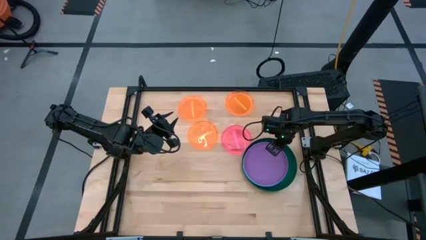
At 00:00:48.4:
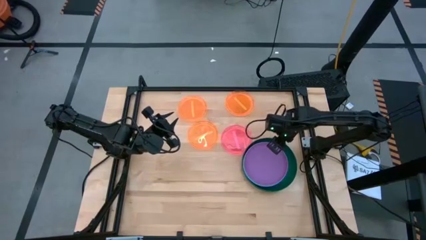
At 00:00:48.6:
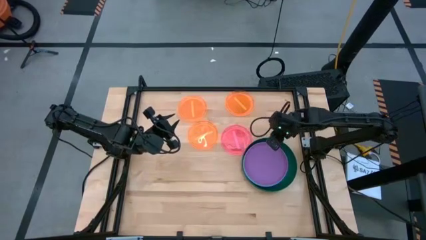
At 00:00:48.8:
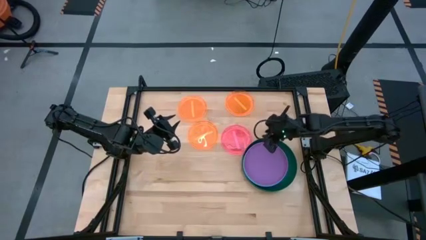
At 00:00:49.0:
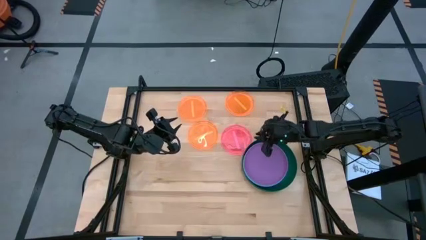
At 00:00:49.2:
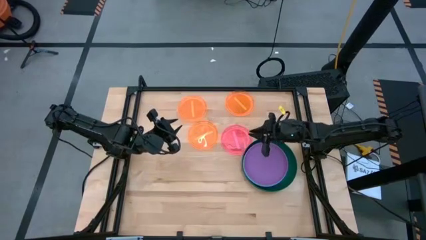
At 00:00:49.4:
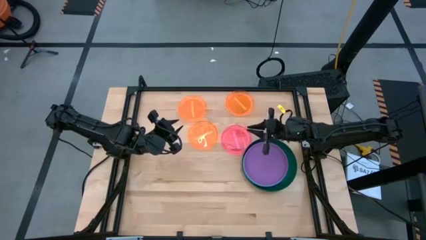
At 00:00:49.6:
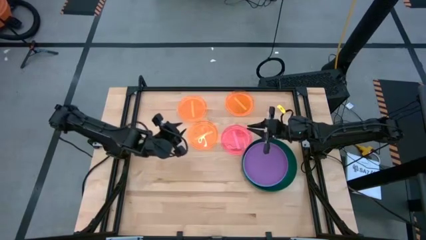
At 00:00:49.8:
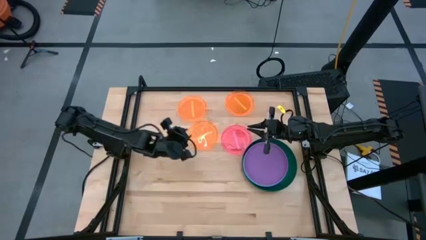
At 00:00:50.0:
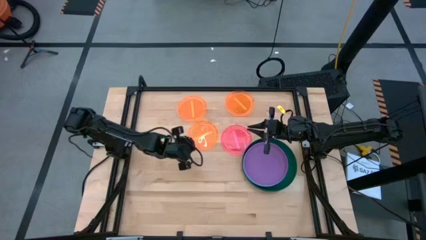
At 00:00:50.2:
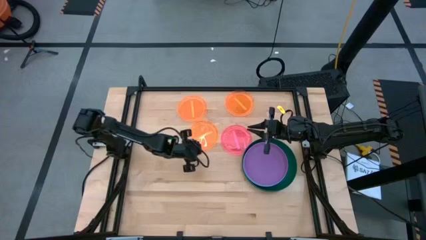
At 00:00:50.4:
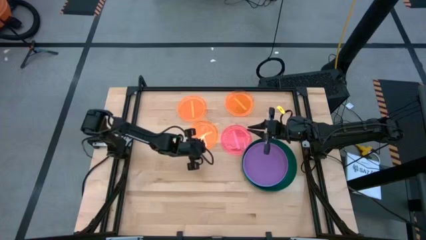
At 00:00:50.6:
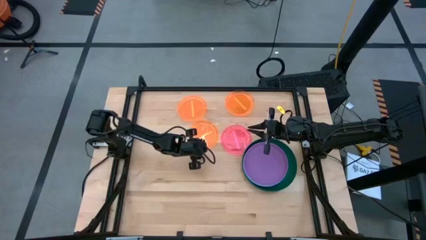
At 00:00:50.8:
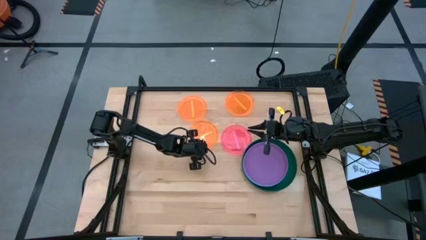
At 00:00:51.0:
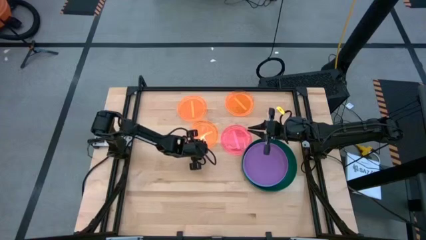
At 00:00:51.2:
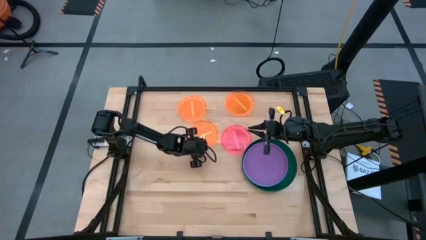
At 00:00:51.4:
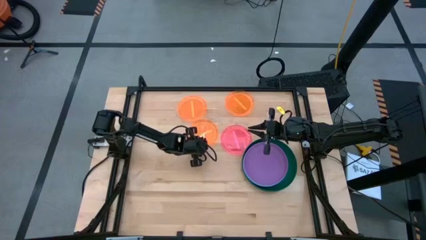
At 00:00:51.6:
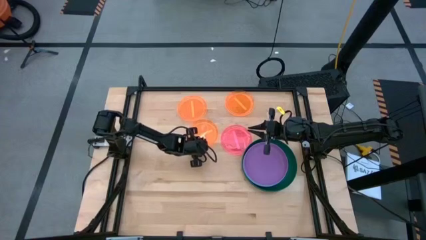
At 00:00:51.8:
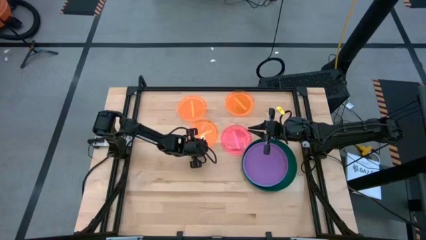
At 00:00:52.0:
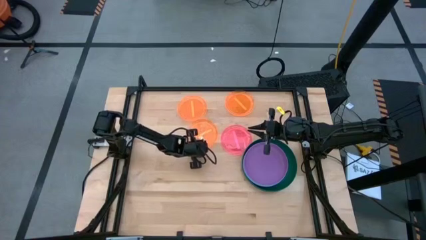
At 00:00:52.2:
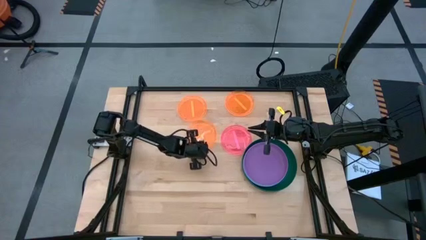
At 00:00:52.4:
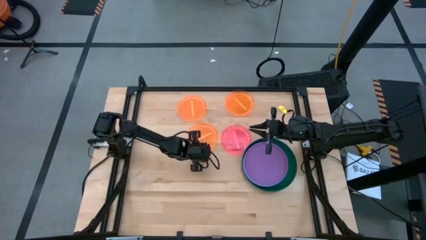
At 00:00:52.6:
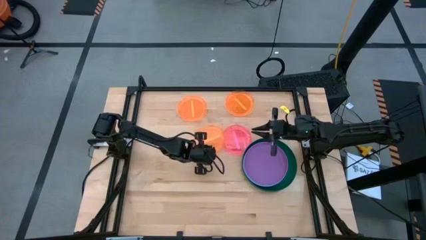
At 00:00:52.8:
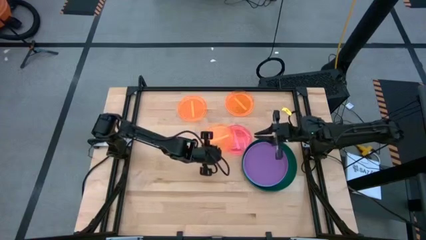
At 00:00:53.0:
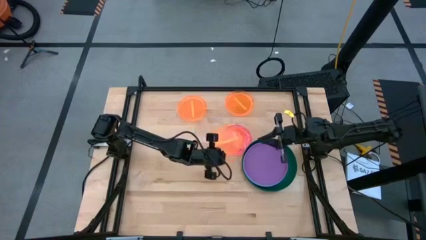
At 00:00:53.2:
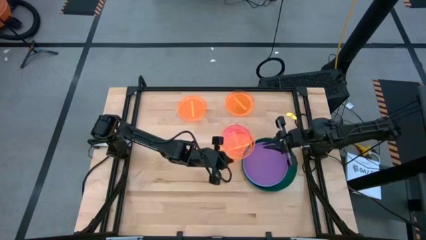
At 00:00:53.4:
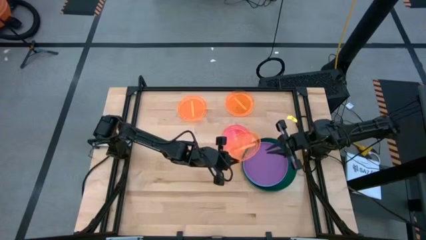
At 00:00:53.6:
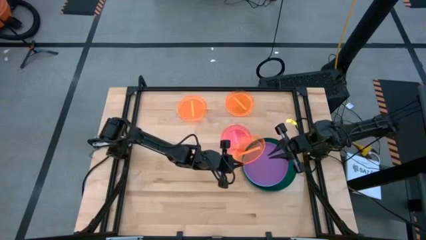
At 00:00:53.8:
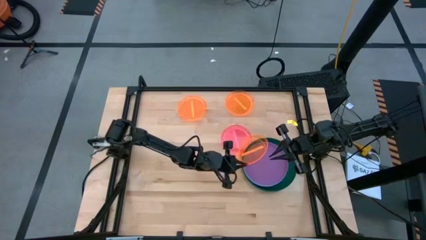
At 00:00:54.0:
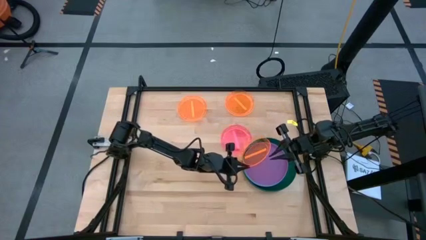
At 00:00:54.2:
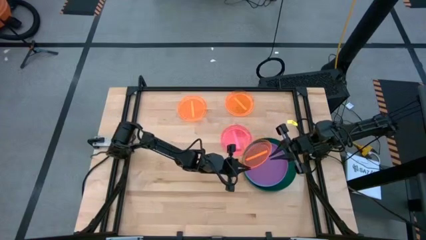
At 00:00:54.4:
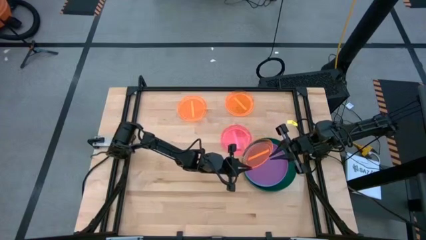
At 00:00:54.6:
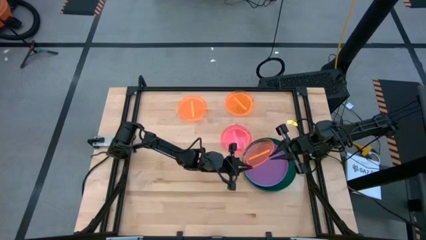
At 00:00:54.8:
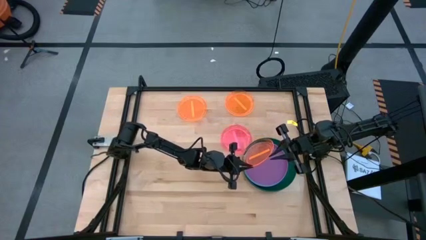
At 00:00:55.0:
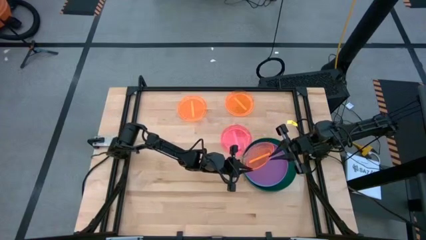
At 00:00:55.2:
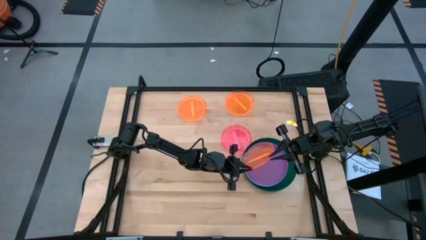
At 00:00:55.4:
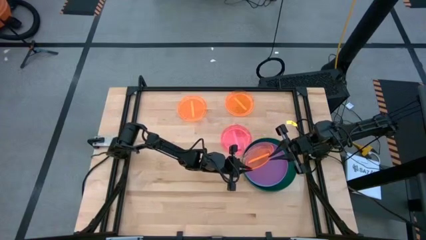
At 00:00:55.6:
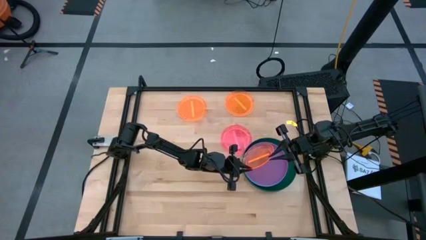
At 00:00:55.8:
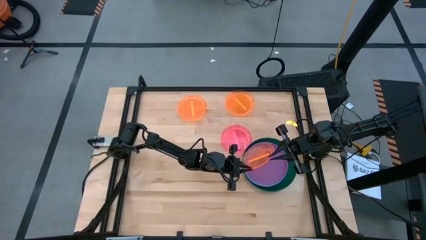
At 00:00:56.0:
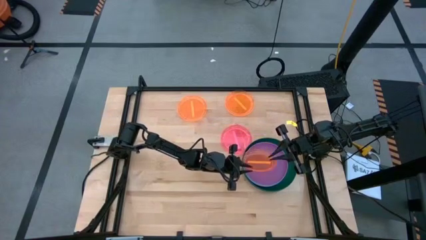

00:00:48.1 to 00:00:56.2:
Task: Stack plastic plates
Stack the bottom left small orange plate on top of the medium purple plate

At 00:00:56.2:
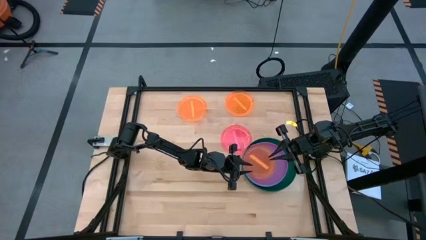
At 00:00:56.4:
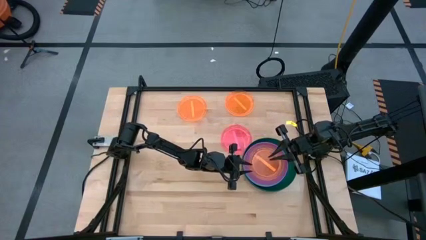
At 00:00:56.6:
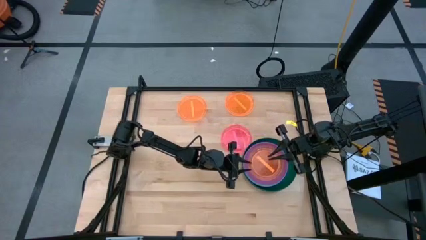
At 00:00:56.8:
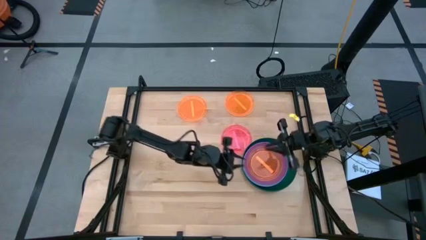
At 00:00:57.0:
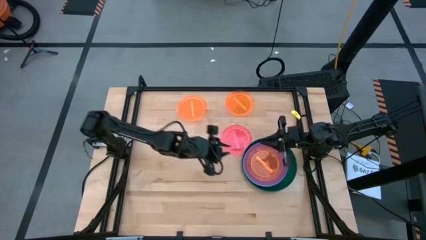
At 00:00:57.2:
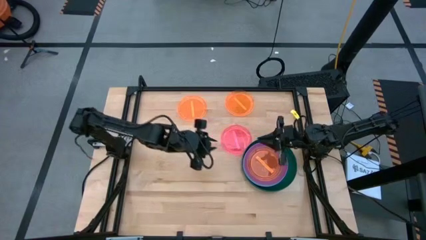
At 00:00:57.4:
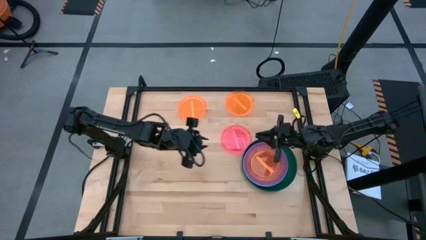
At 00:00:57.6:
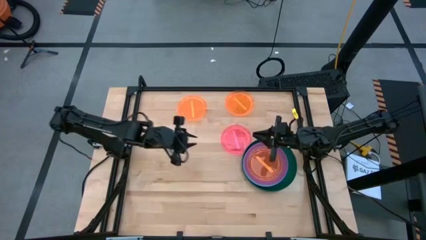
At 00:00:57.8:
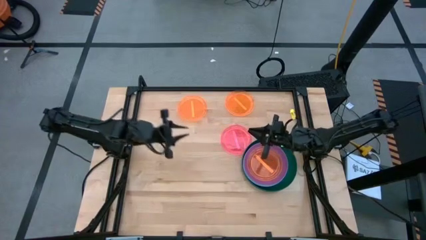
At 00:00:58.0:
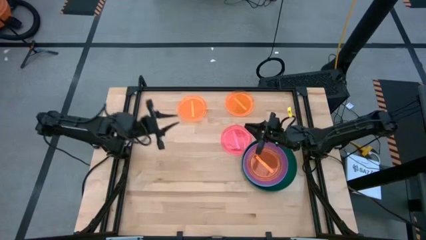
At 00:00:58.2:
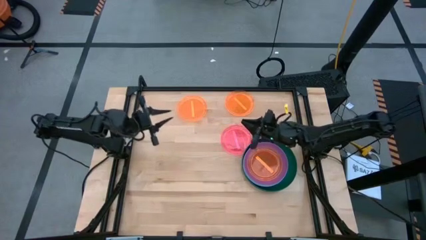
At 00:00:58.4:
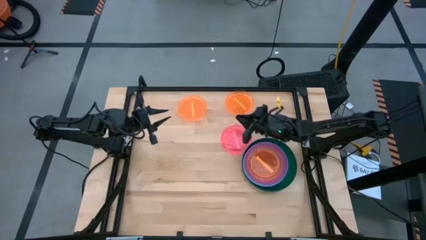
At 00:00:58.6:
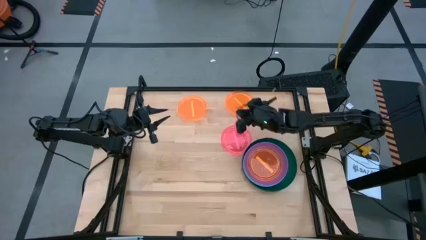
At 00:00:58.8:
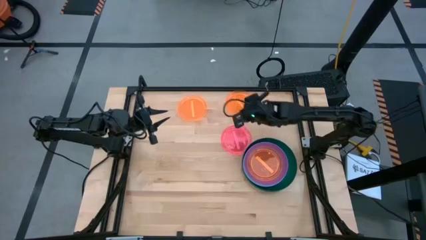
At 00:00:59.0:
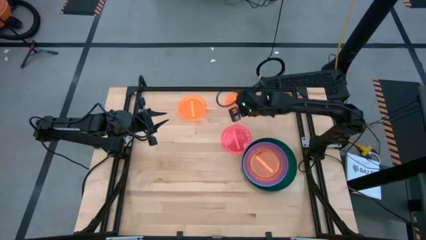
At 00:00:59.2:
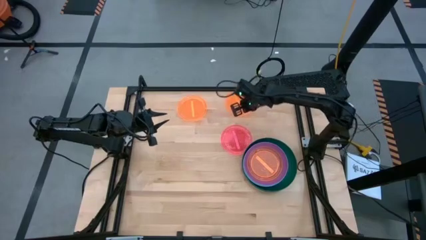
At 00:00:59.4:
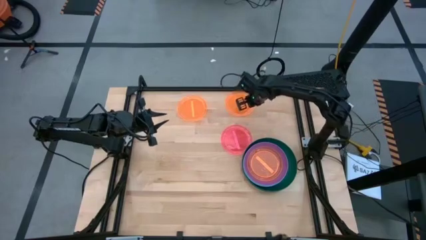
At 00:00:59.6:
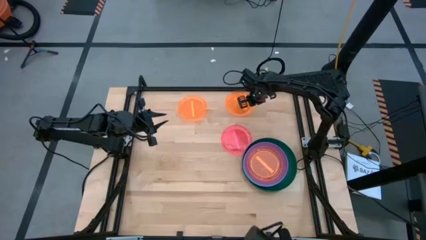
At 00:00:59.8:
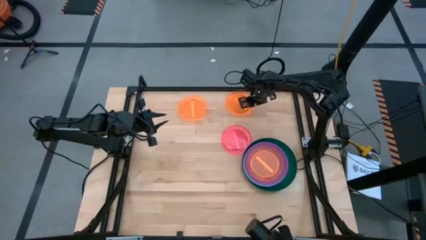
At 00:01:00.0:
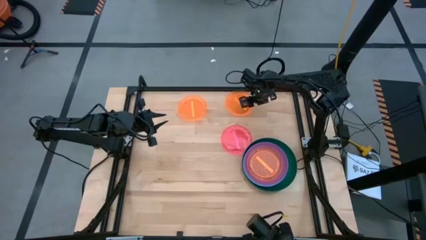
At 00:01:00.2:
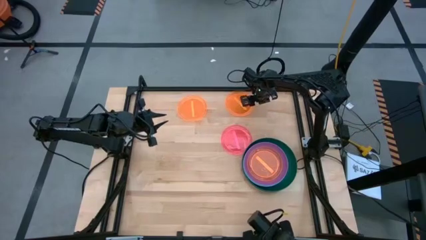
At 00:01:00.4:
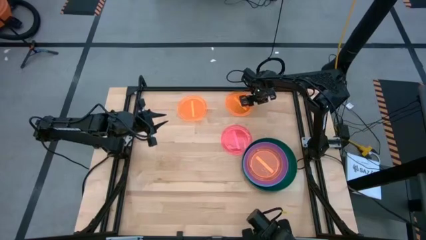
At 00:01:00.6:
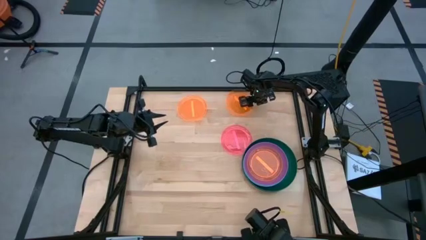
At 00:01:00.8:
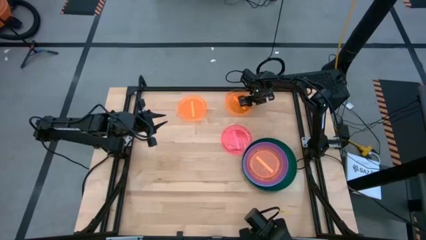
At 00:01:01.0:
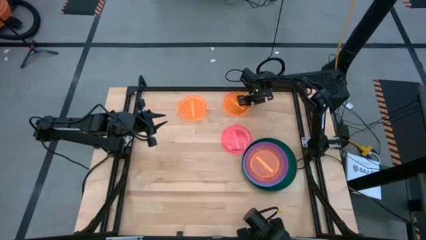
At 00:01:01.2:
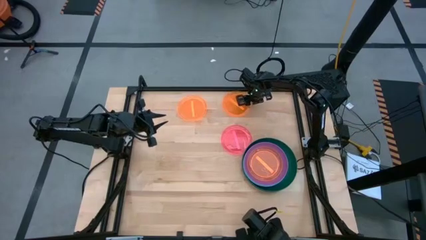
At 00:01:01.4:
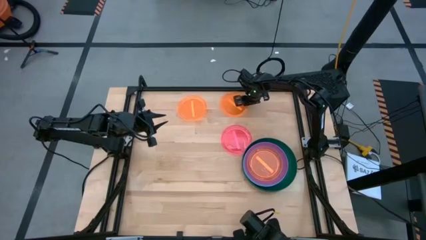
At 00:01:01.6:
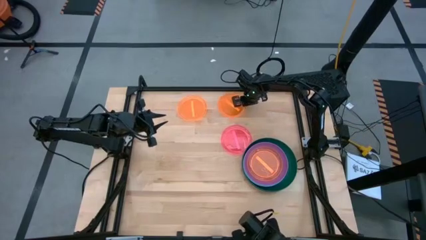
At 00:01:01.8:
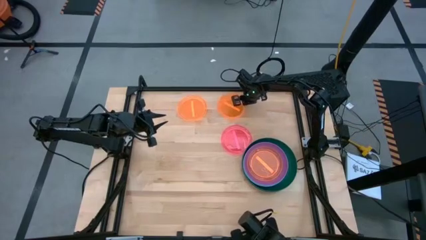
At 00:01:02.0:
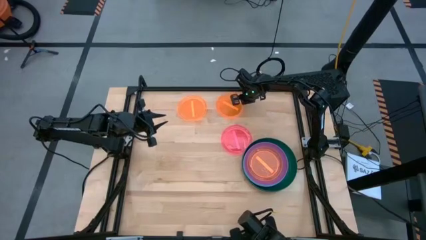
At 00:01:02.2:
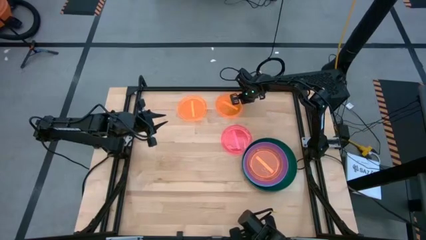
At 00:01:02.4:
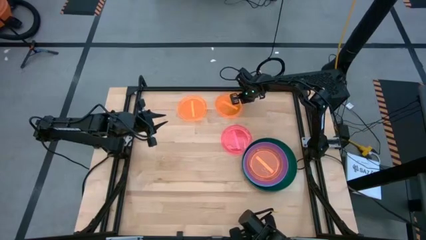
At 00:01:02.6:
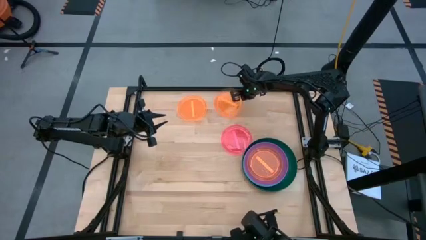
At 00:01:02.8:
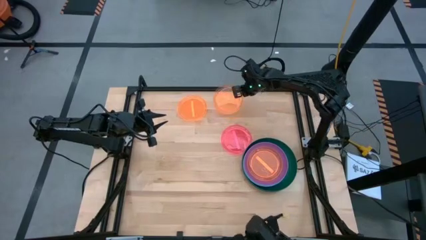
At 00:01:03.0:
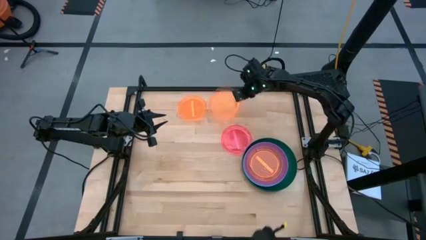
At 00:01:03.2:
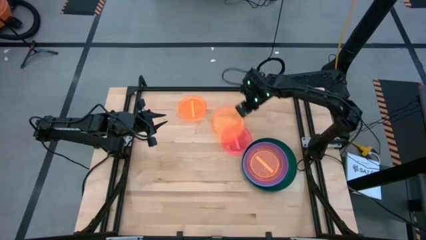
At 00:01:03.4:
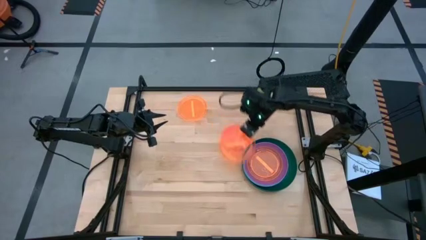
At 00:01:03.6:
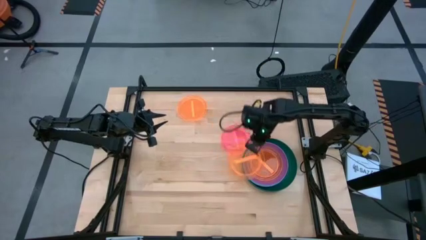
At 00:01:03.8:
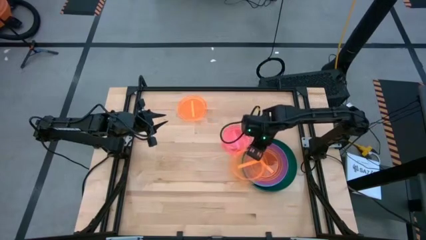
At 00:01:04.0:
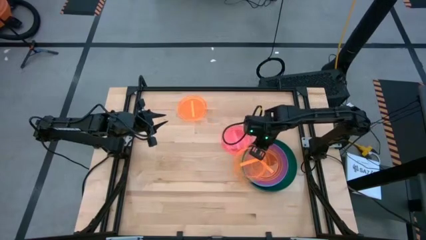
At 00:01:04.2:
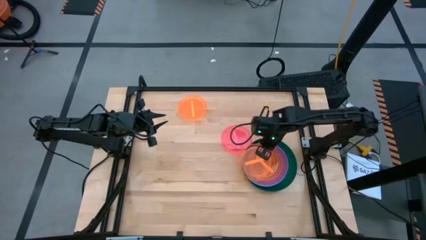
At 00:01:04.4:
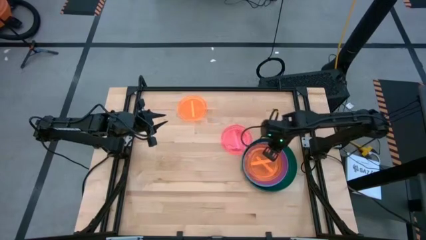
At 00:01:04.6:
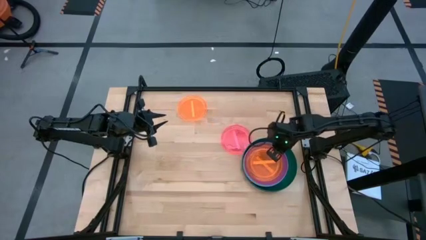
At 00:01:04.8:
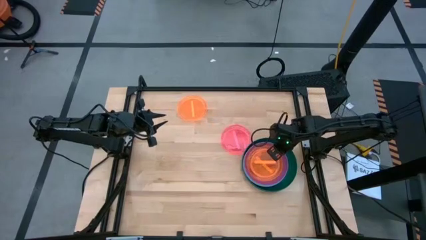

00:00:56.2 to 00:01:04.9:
Stack the right small orange plate on top of the bottom small orange plate
